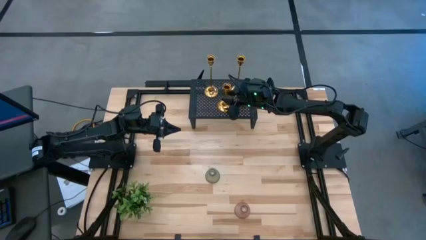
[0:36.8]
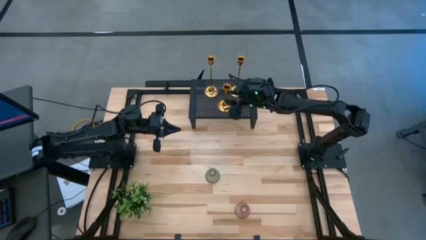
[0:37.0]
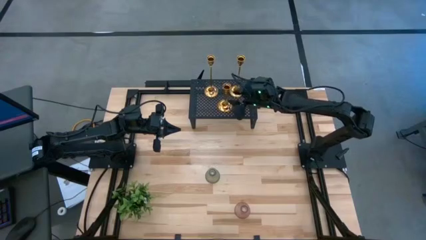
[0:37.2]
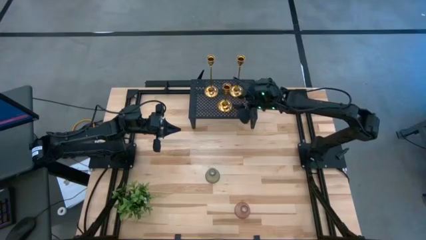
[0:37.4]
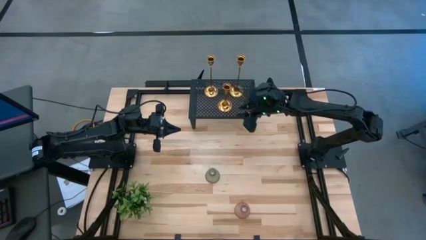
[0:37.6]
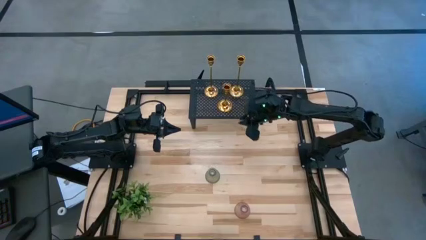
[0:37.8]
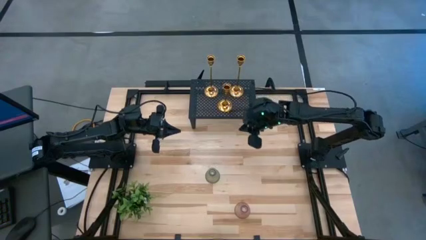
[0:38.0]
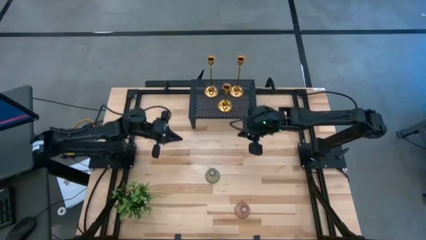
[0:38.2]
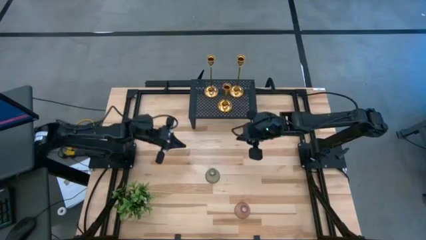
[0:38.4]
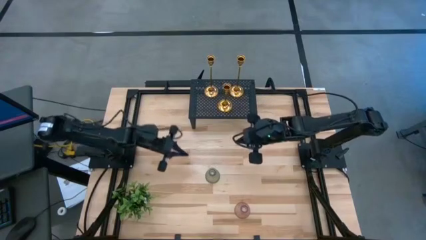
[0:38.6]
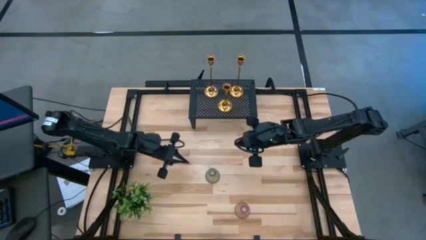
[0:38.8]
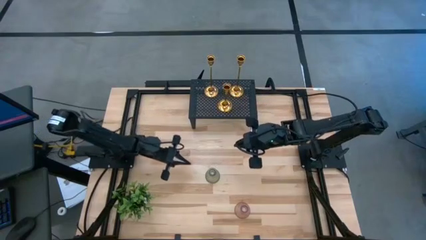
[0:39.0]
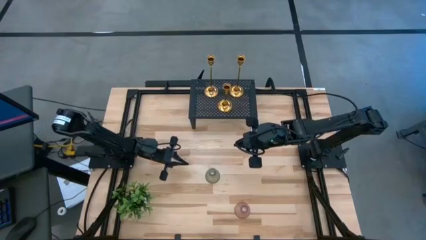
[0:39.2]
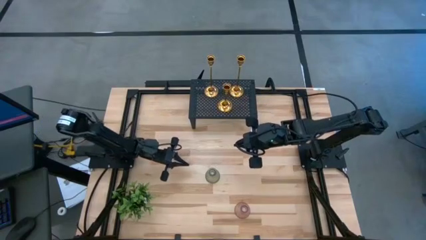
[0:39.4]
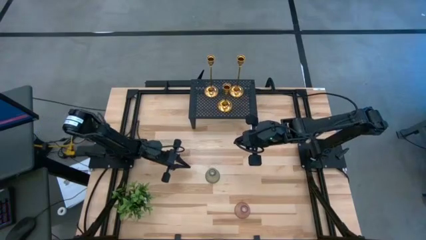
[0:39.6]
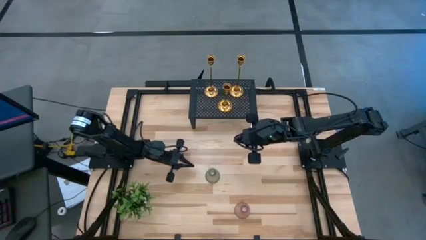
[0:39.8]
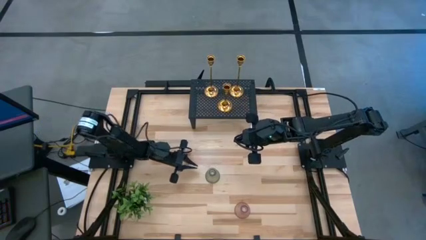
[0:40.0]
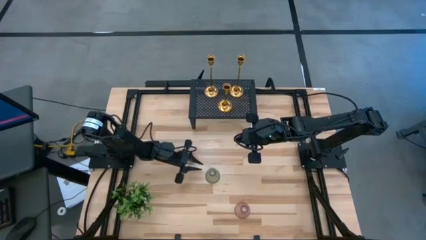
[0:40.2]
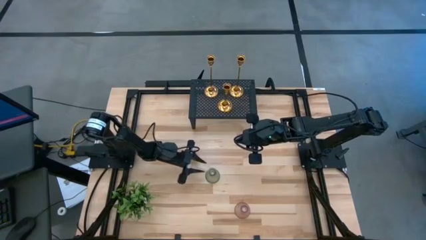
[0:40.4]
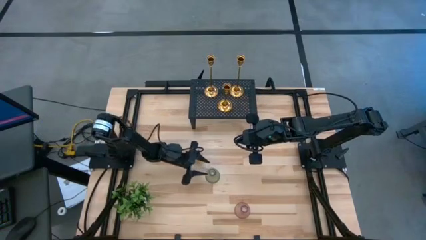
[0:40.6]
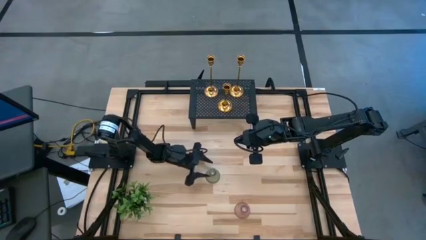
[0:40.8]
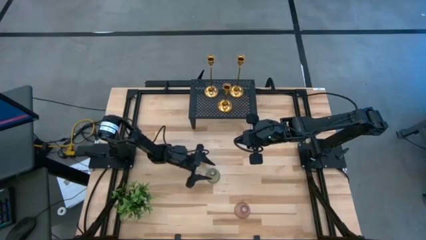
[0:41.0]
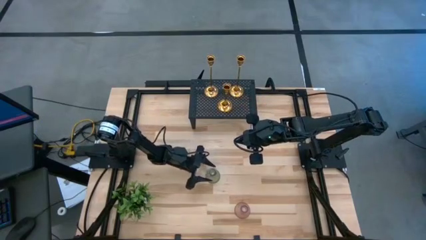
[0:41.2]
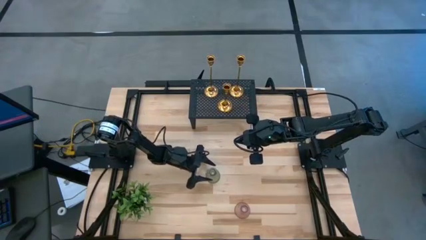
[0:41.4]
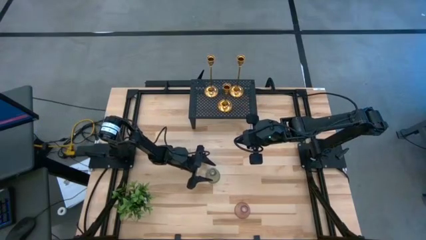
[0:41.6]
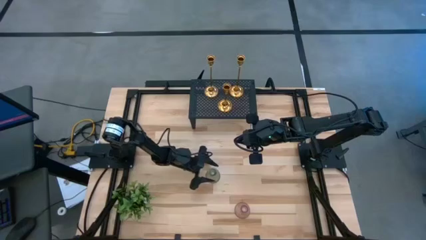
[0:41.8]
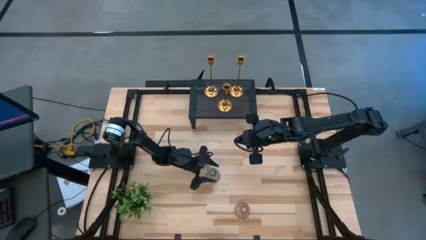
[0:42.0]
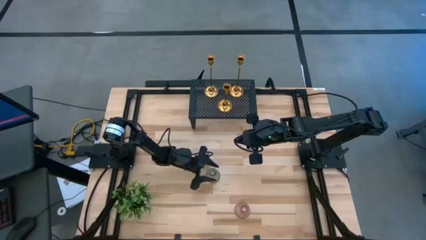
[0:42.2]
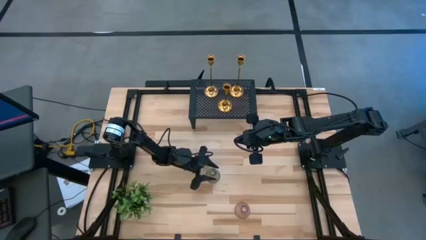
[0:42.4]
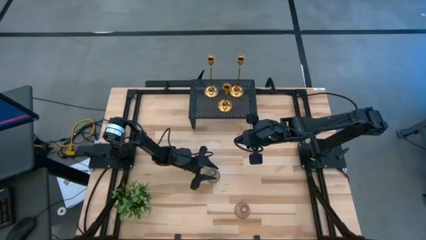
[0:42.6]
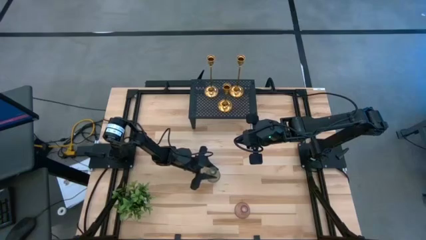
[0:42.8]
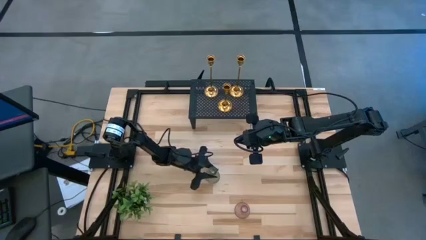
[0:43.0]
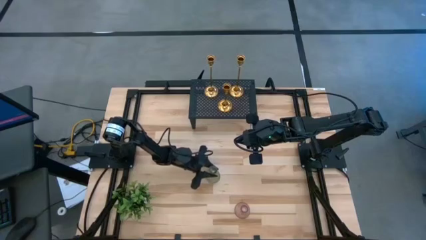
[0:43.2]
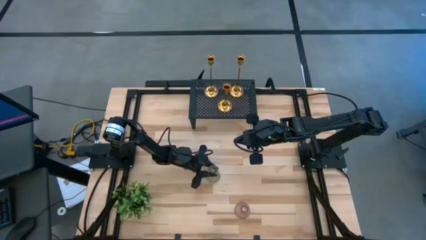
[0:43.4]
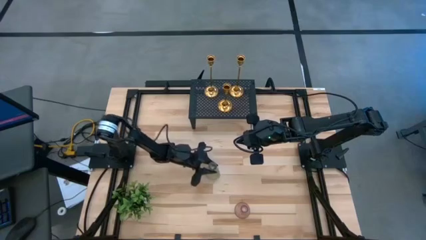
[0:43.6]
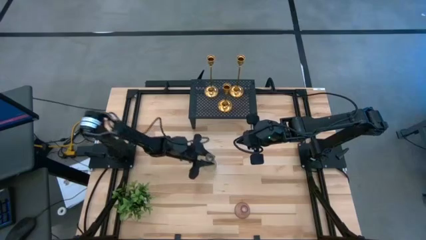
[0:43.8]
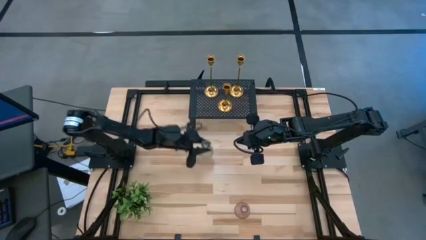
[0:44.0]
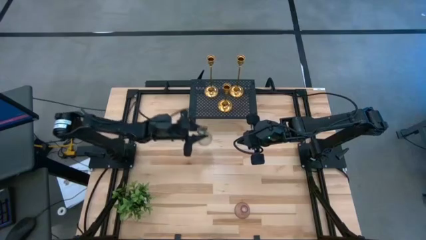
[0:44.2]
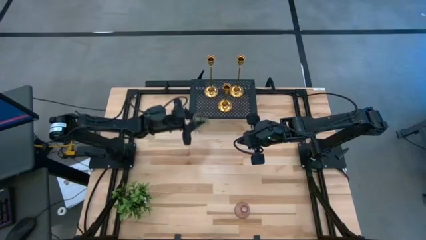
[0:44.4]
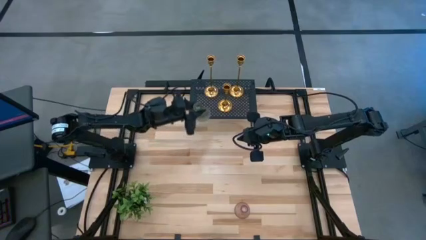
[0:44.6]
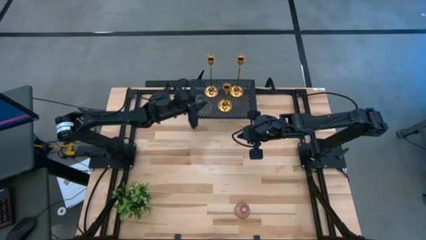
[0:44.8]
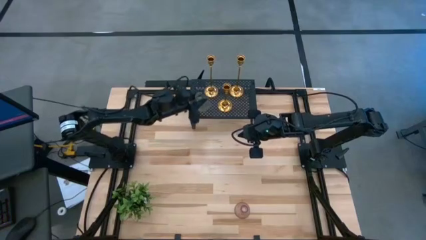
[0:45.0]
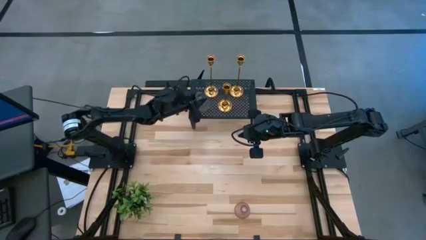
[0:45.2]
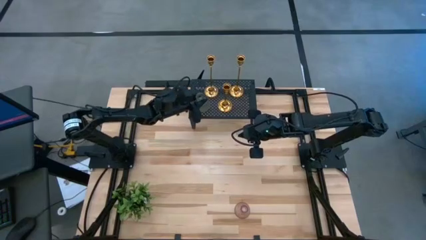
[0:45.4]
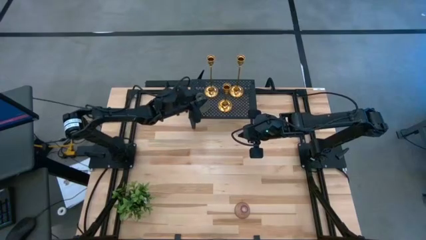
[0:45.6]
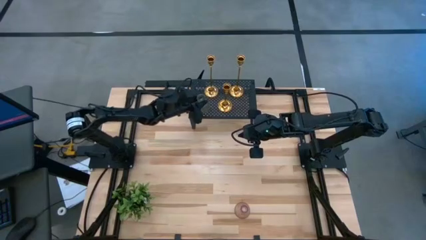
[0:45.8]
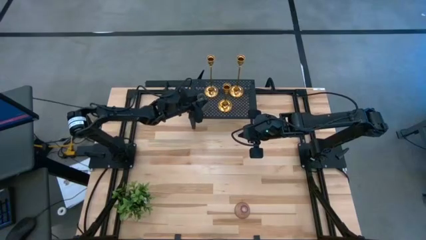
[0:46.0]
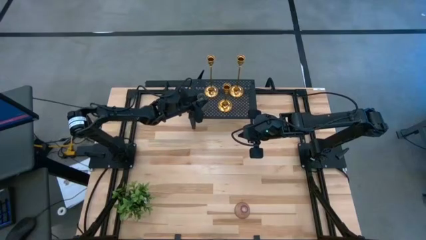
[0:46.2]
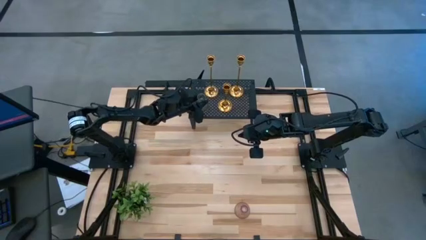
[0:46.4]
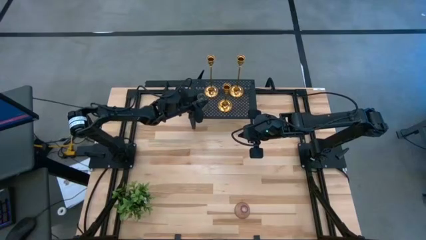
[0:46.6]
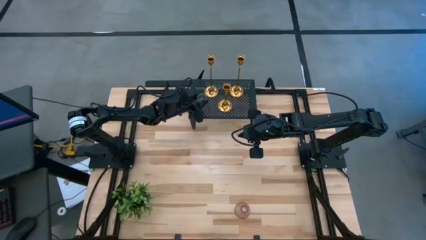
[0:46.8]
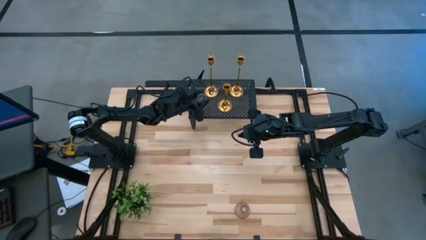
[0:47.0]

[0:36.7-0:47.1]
Task: Pick & Place candle stick holders
Put the green glass candle holder on the shelf
